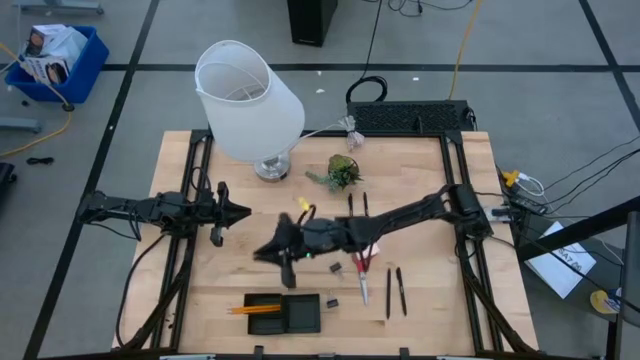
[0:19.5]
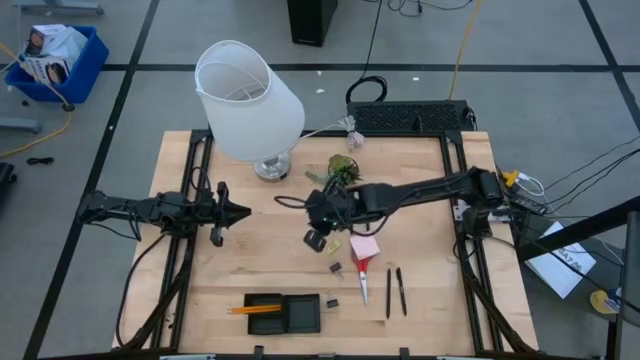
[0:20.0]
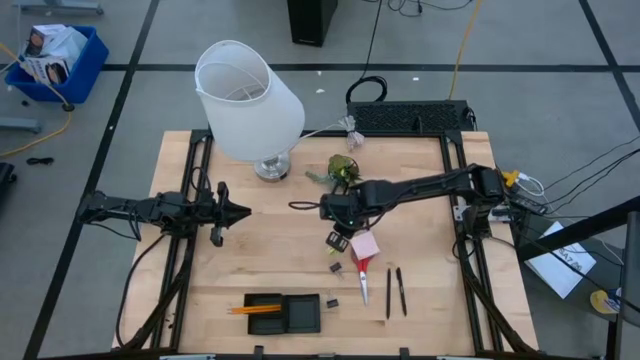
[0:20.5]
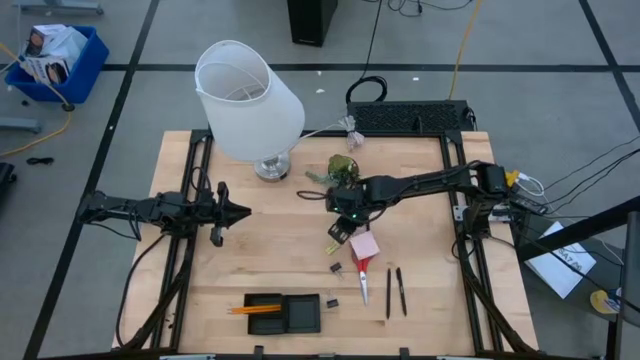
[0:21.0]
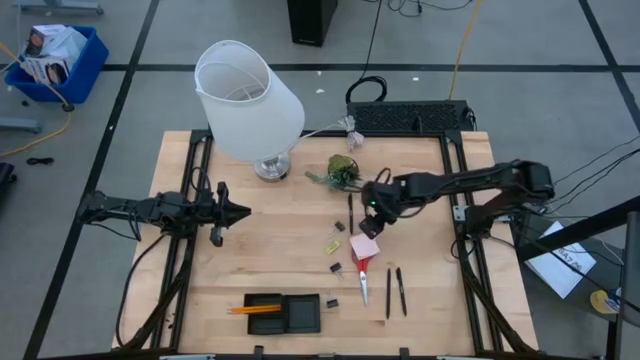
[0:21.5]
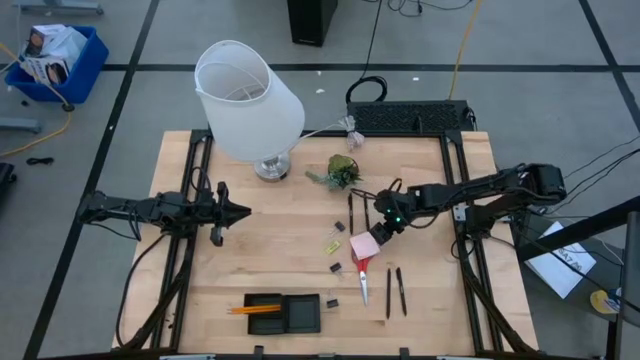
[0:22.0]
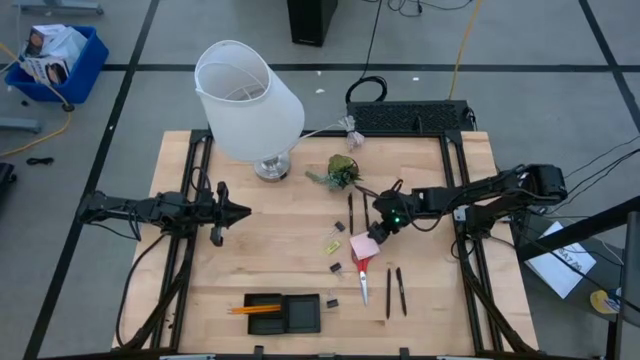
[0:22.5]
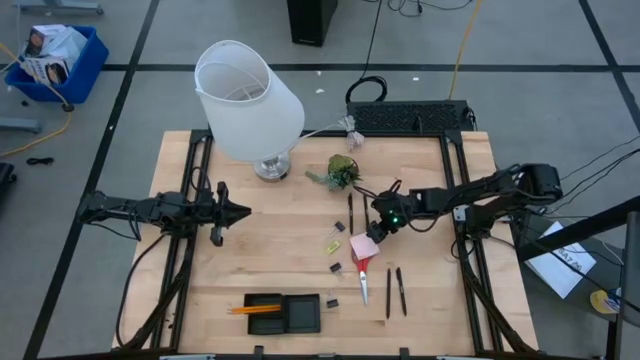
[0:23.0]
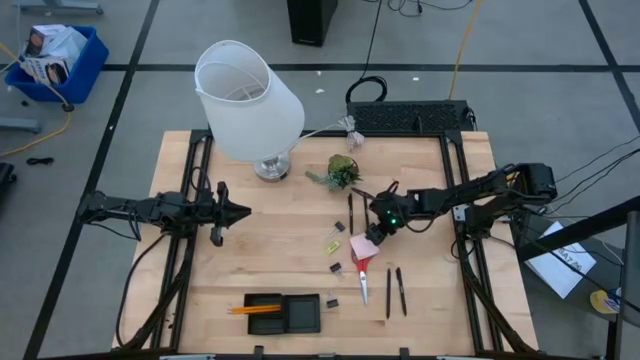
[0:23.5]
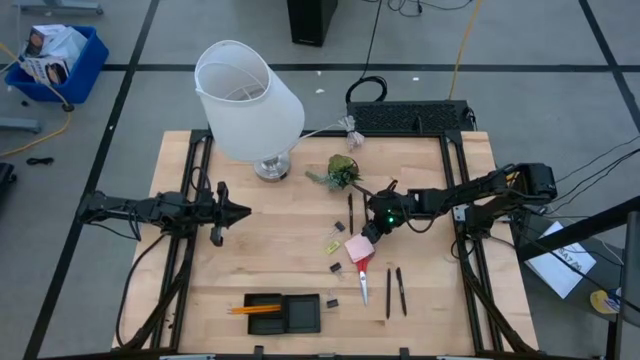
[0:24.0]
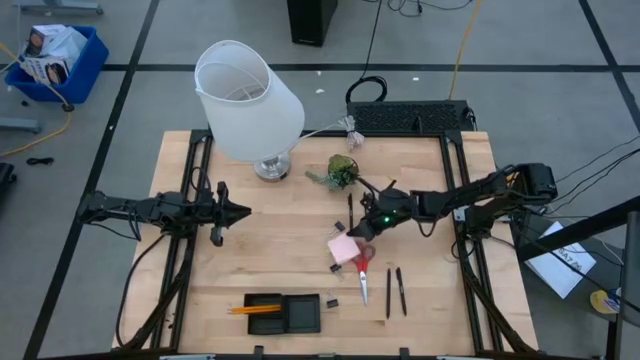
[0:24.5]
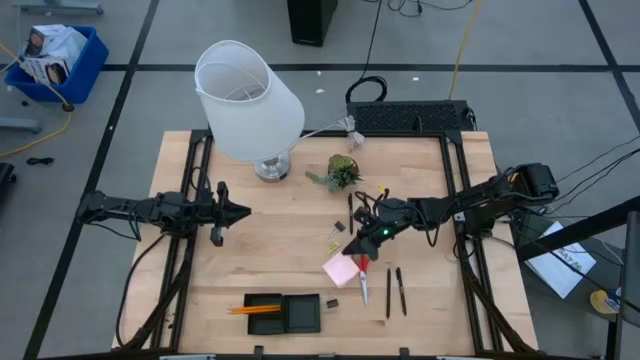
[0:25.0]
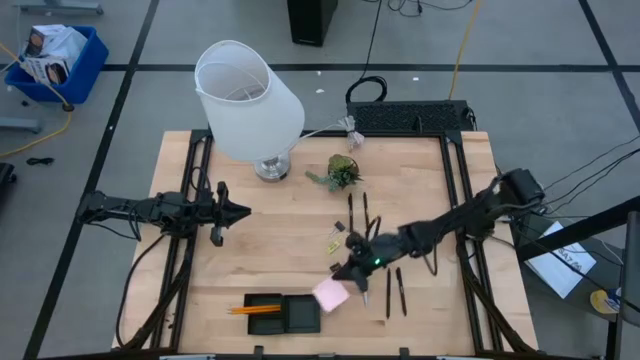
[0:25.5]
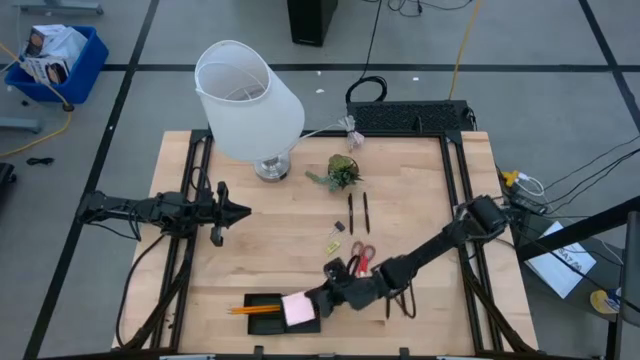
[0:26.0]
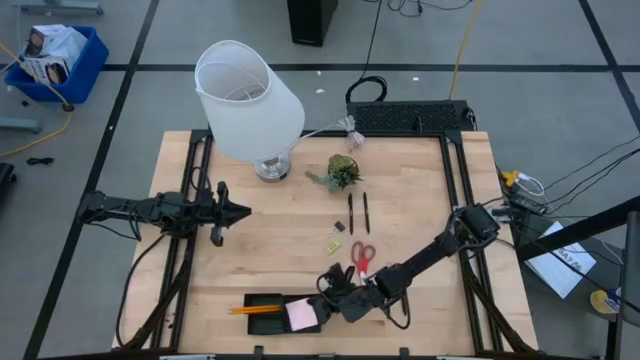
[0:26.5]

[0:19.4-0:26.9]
Task: Pick and place office supplies into organizer
Put the pink sticky note into the mesh desk organizer

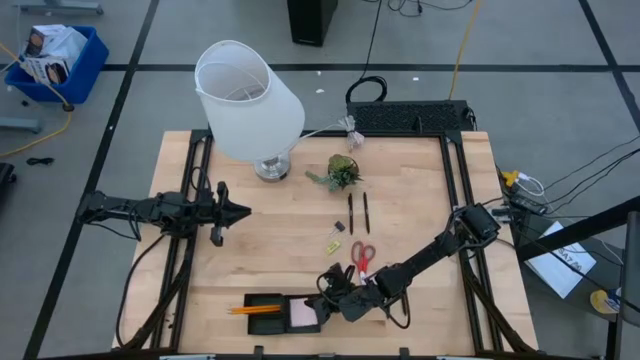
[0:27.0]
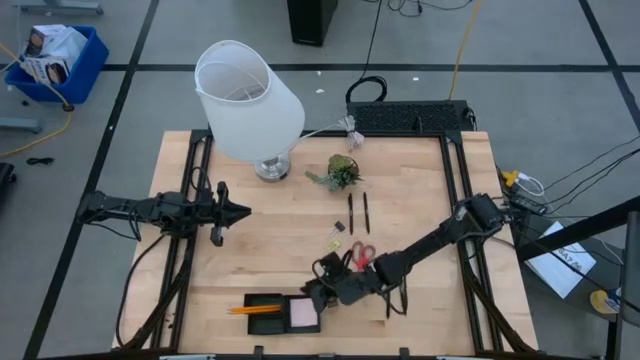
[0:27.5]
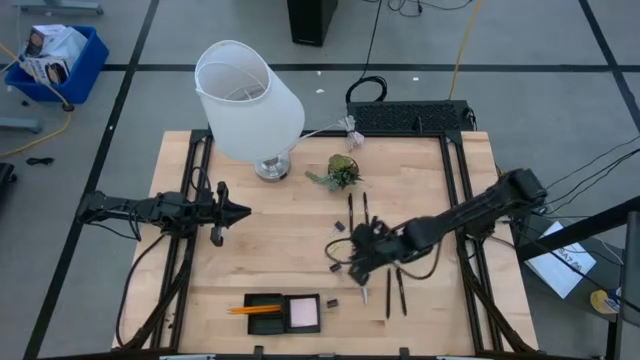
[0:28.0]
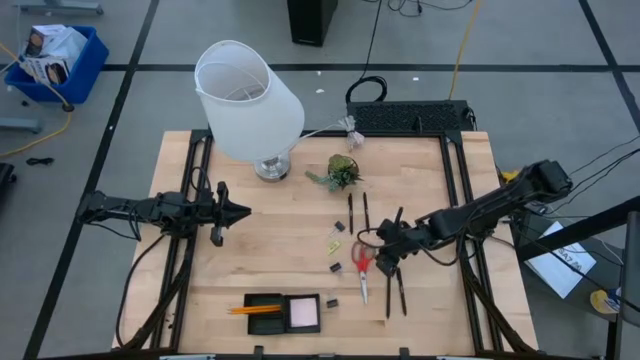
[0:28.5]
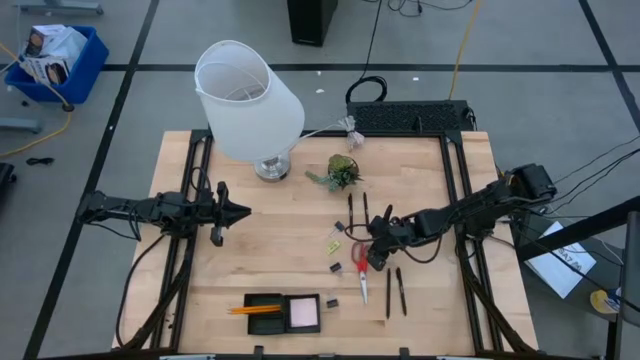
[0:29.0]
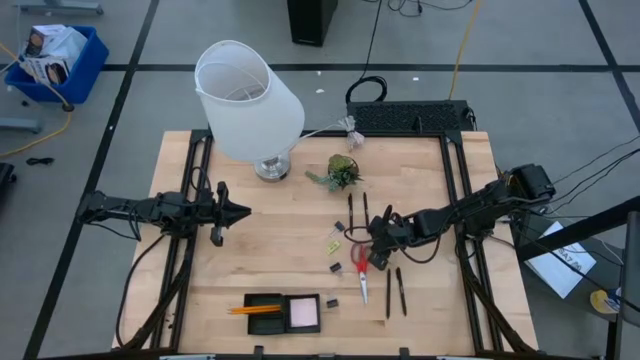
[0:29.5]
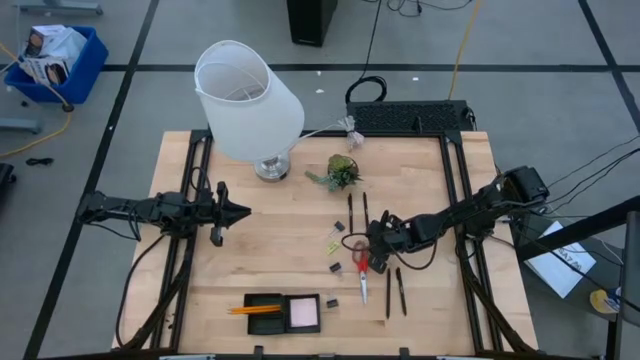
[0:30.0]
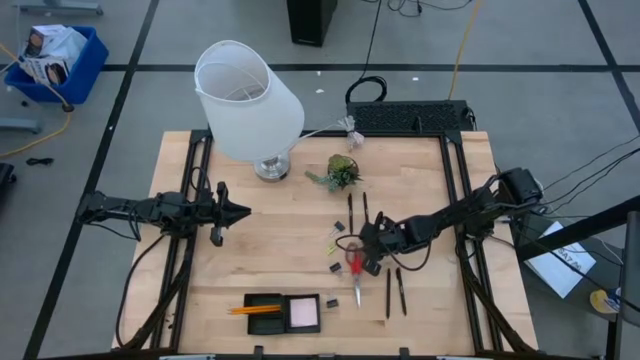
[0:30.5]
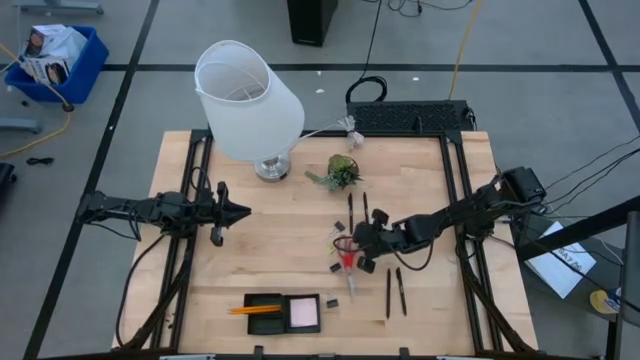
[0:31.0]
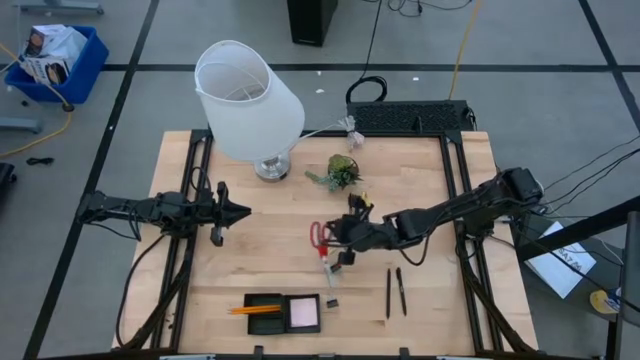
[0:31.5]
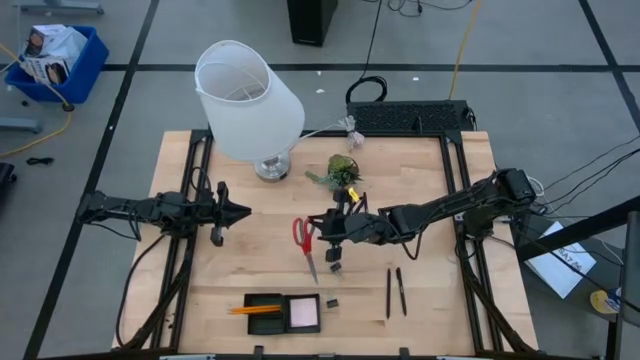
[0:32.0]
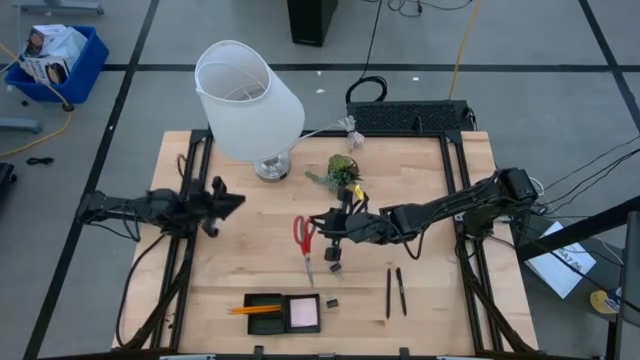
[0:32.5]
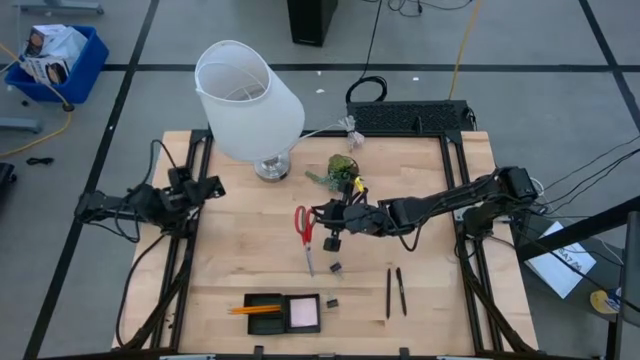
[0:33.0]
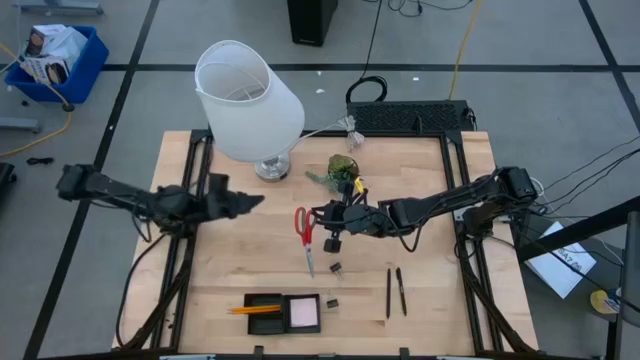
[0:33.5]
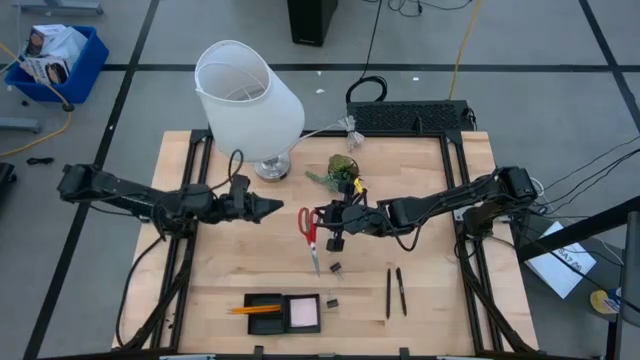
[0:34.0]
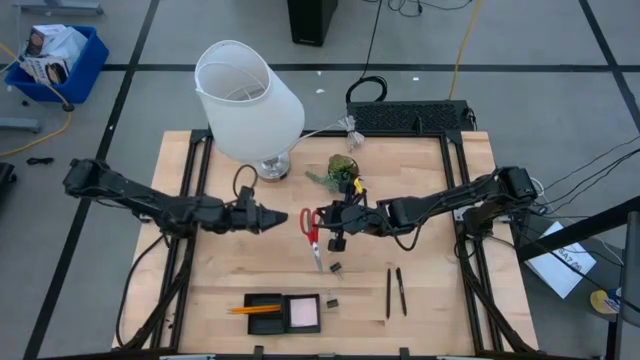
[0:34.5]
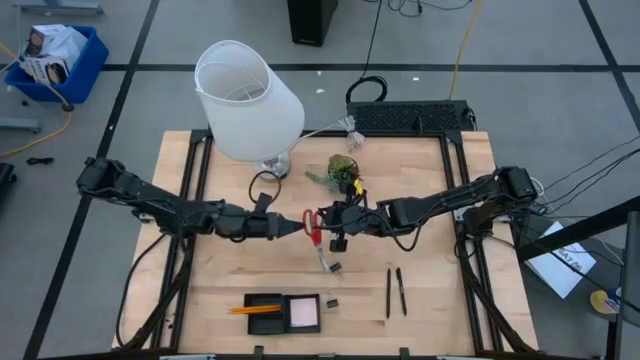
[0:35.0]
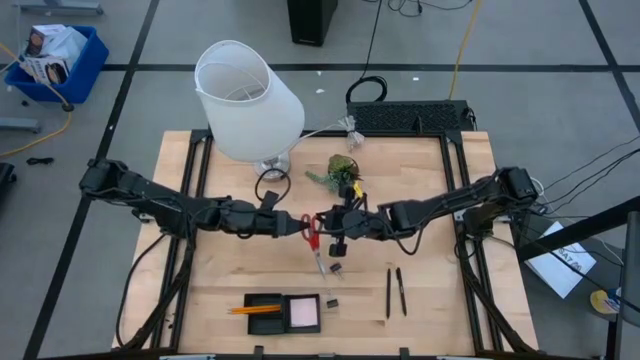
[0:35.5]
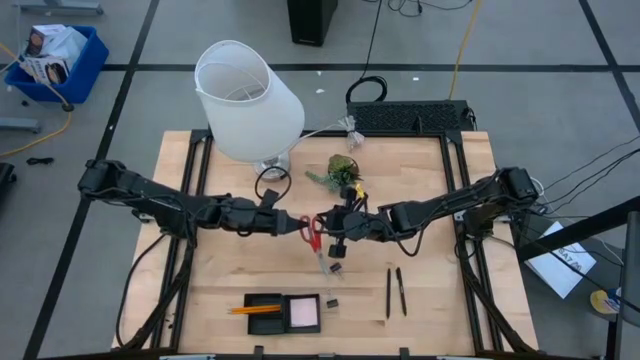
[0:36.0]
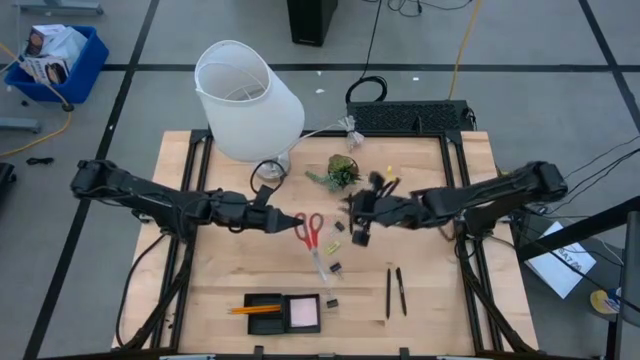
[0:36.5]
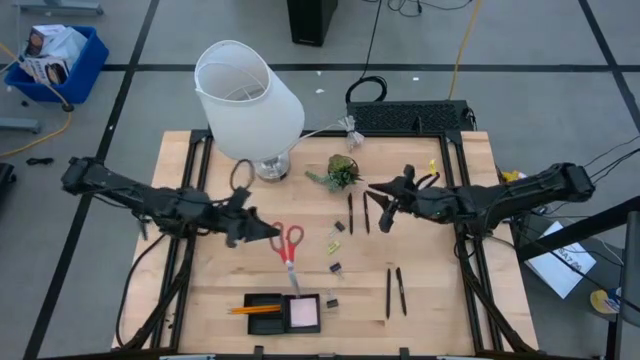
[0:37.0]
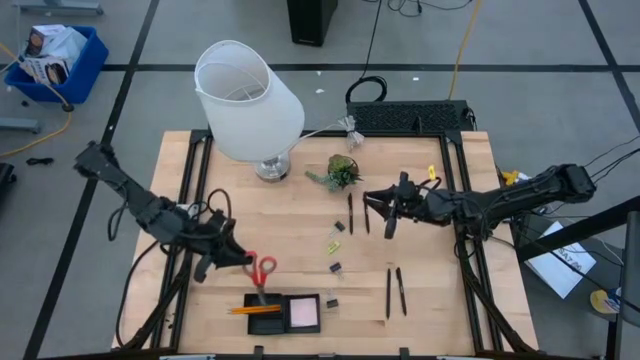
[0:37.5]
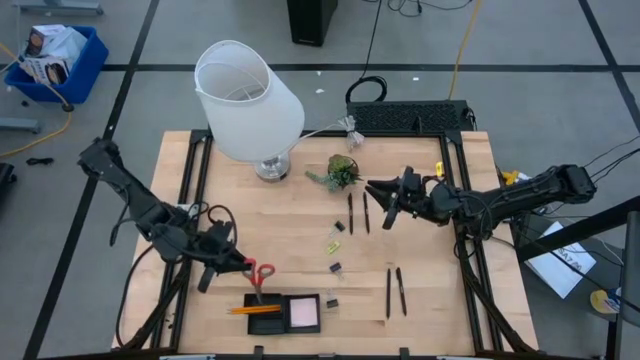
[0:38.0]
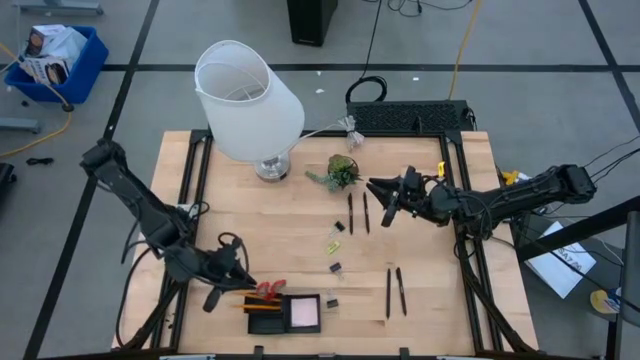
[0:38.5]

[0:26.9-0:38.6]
Put the red scissors into the mesh desk organizer

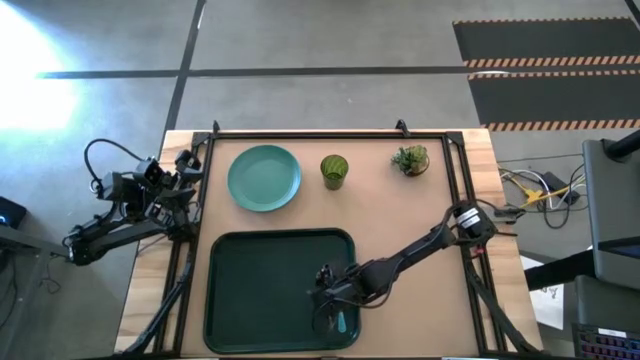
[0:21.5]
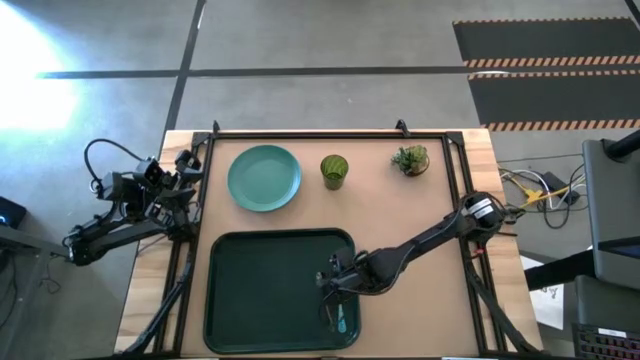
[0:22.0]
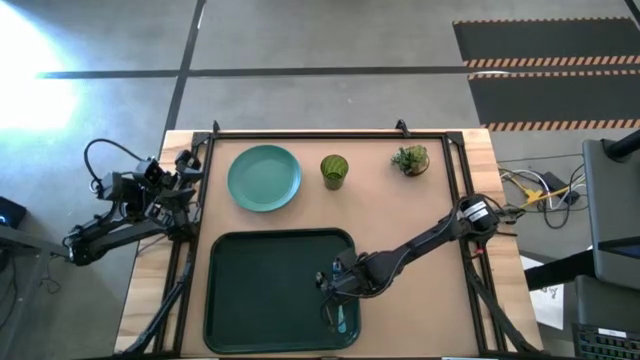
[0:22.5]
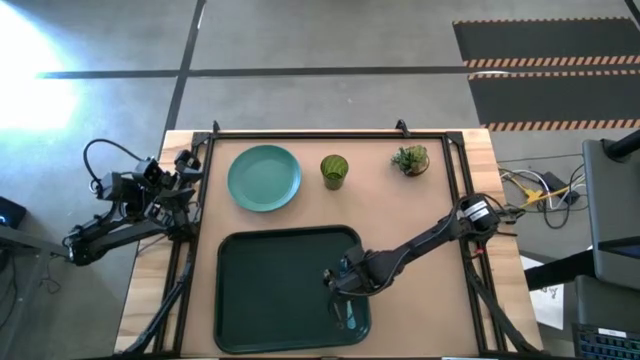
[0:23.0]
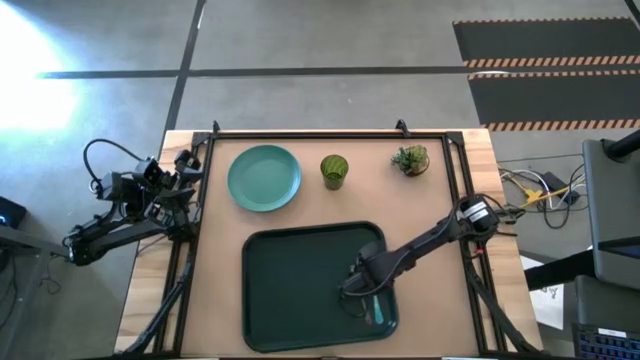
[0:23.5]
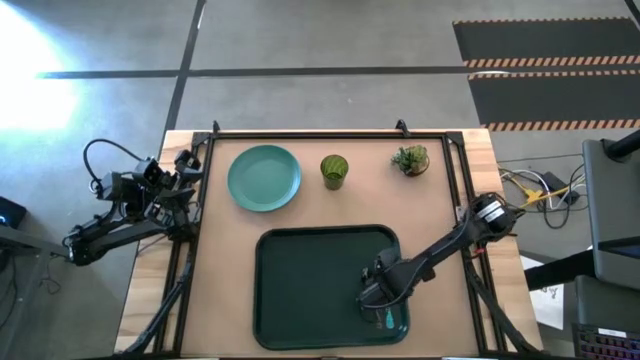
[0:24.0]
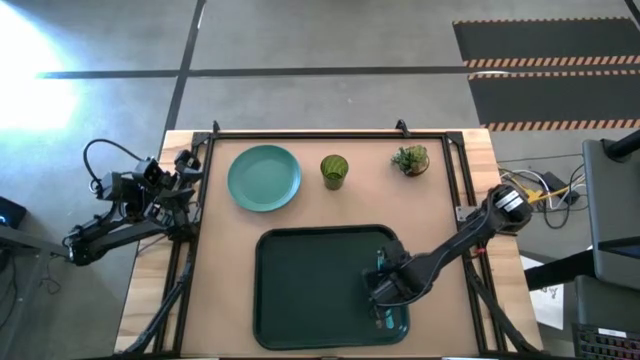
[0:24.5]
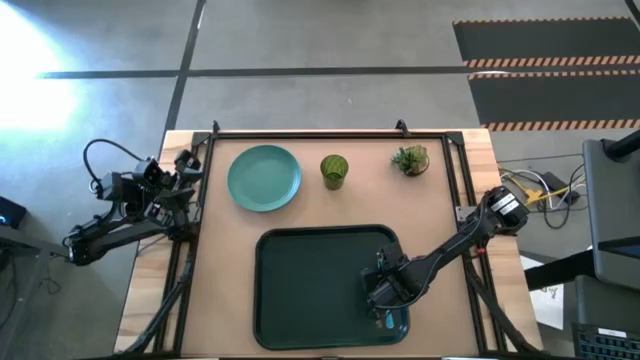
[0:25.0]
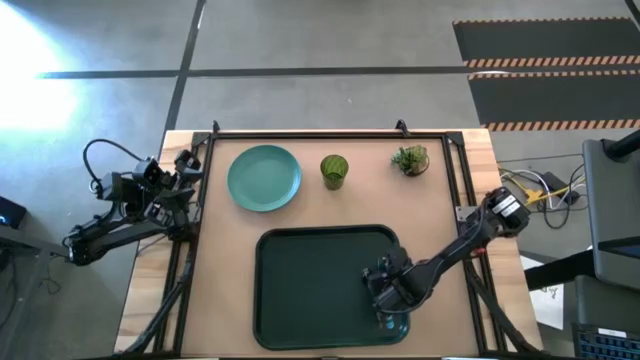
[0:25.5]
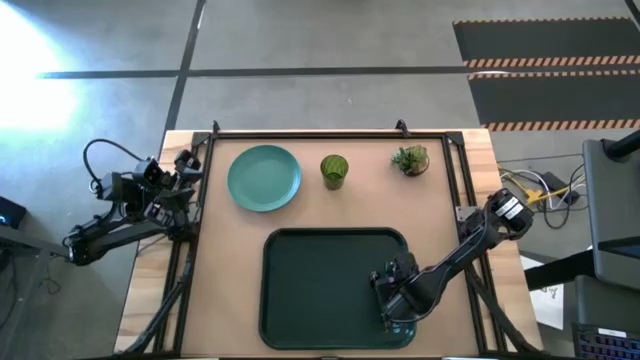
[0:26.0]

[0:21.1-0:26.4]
Task: Pick and place plate/cup/fork/spoon on tray
Move the serving tray to the bottom center of the table
